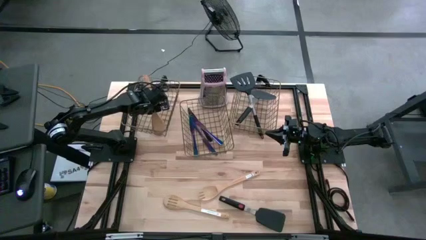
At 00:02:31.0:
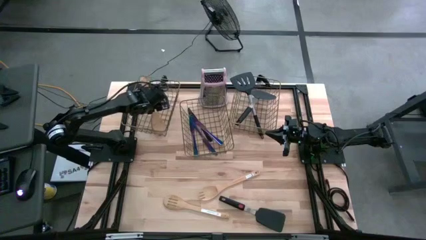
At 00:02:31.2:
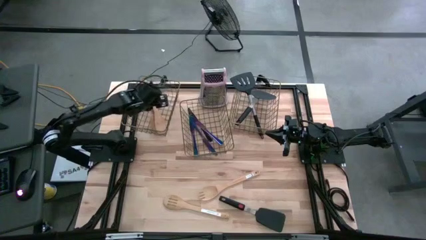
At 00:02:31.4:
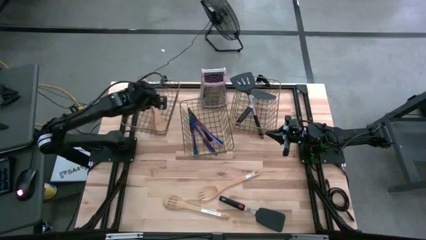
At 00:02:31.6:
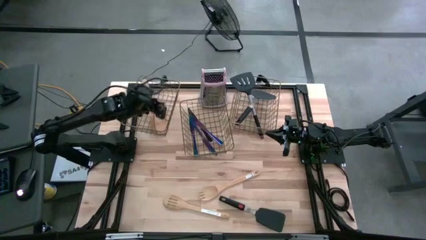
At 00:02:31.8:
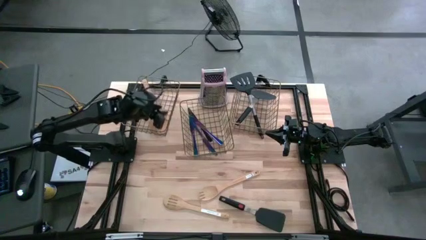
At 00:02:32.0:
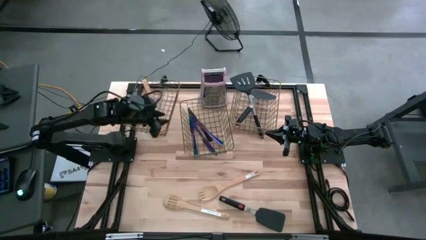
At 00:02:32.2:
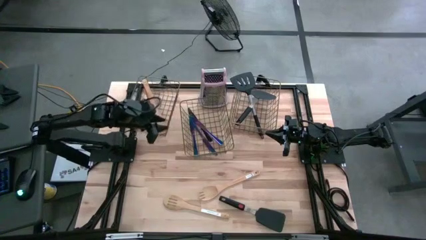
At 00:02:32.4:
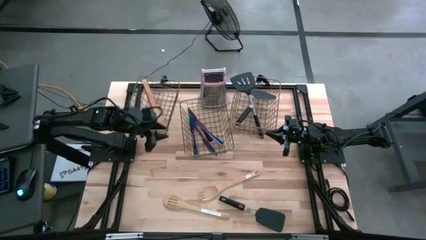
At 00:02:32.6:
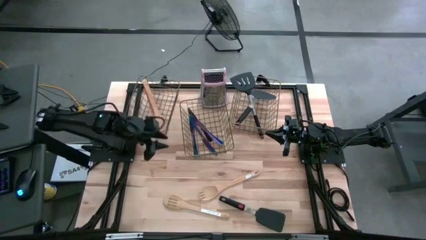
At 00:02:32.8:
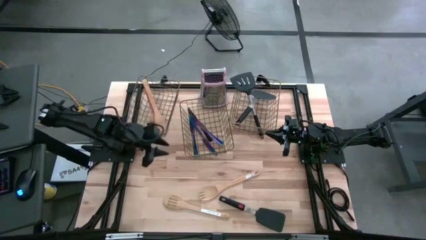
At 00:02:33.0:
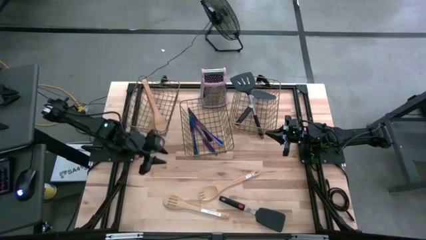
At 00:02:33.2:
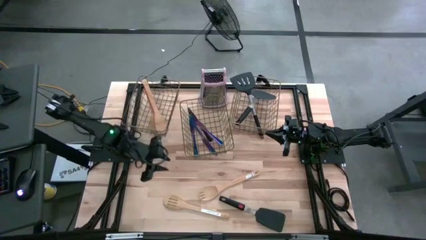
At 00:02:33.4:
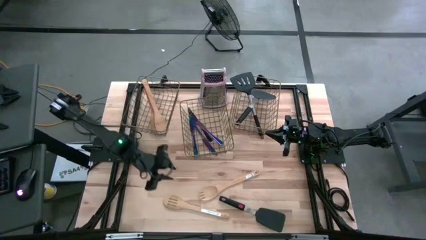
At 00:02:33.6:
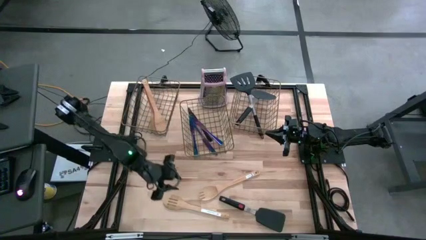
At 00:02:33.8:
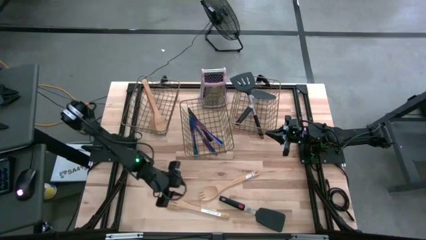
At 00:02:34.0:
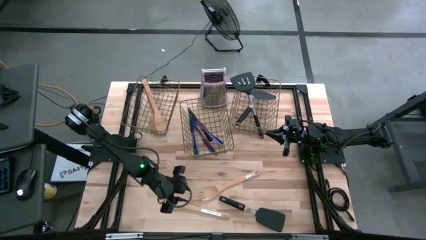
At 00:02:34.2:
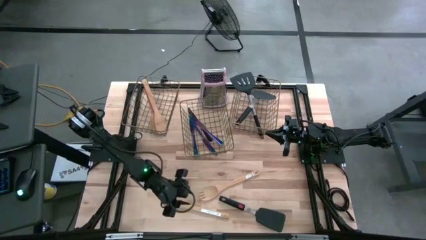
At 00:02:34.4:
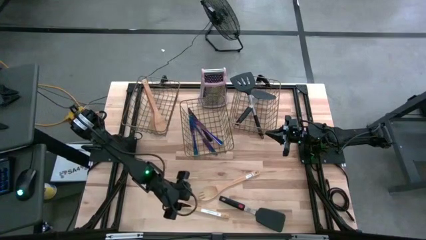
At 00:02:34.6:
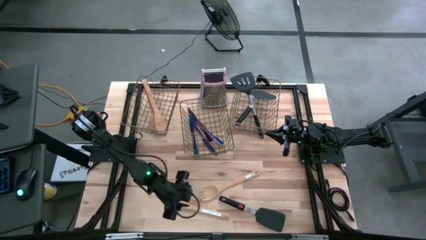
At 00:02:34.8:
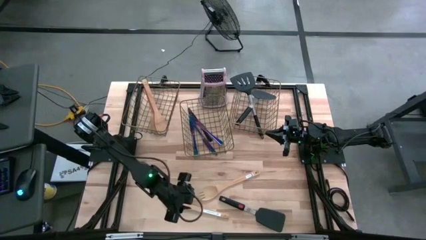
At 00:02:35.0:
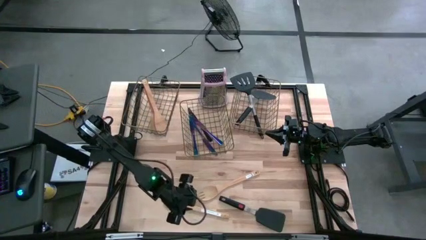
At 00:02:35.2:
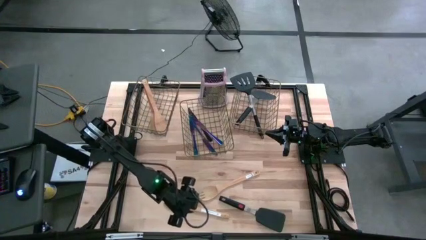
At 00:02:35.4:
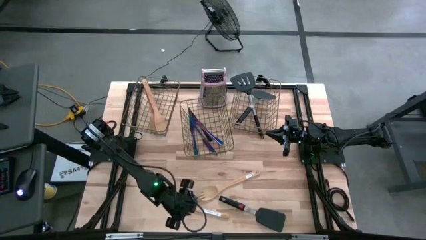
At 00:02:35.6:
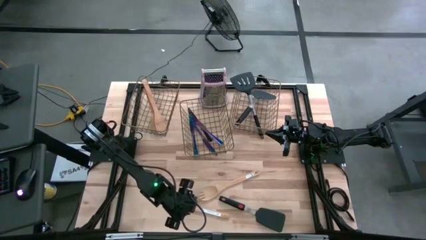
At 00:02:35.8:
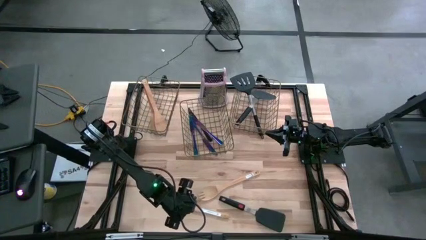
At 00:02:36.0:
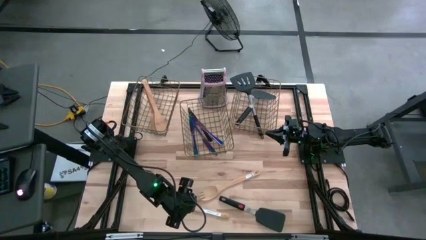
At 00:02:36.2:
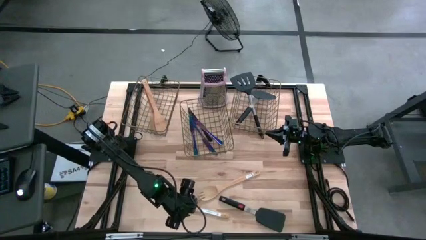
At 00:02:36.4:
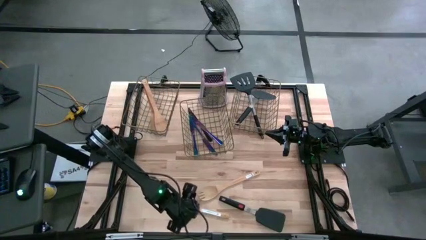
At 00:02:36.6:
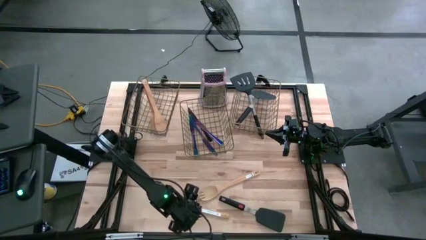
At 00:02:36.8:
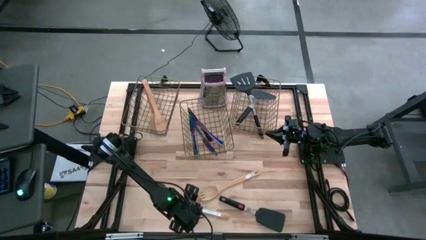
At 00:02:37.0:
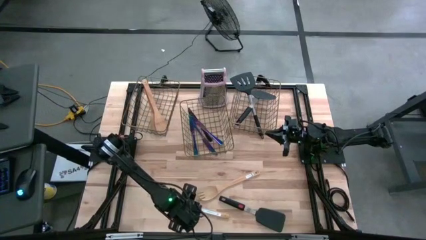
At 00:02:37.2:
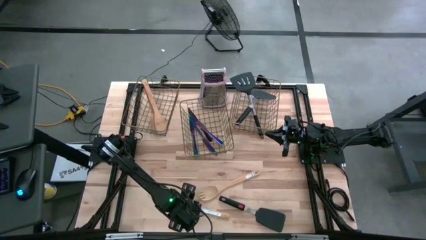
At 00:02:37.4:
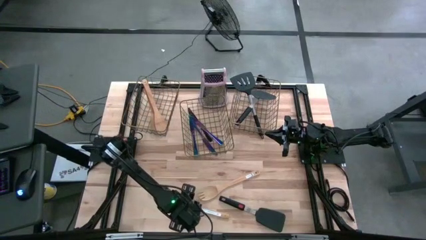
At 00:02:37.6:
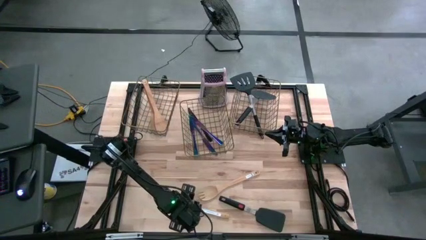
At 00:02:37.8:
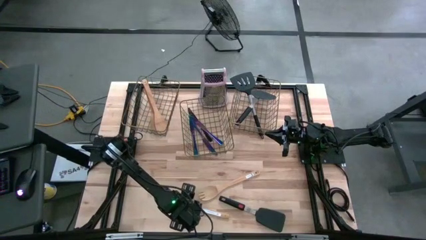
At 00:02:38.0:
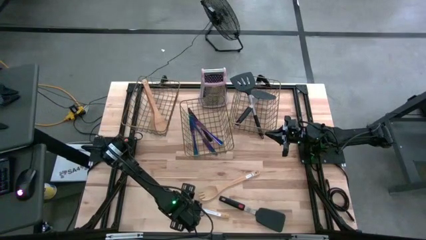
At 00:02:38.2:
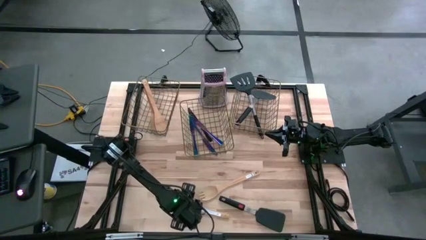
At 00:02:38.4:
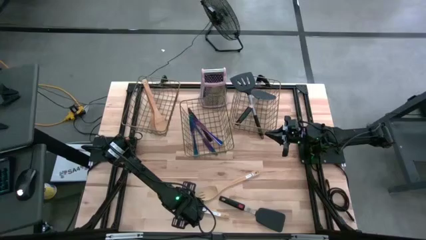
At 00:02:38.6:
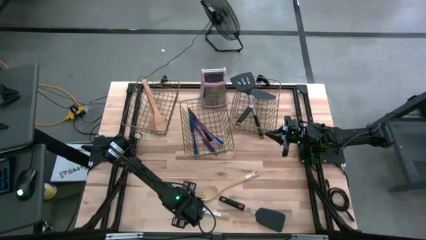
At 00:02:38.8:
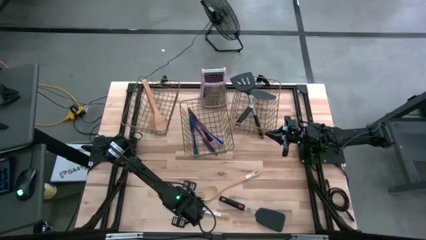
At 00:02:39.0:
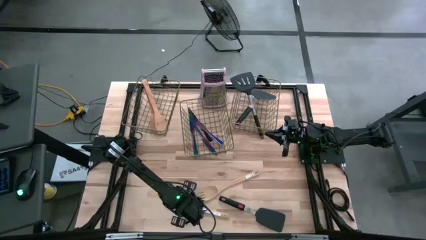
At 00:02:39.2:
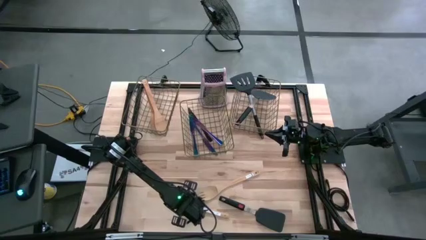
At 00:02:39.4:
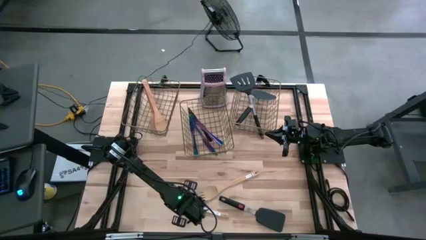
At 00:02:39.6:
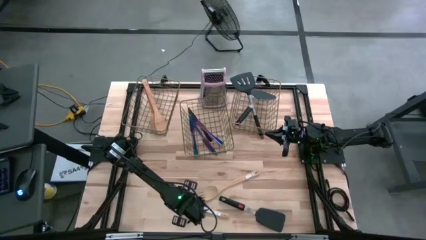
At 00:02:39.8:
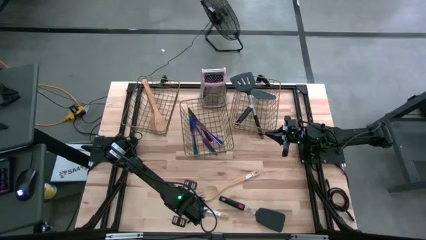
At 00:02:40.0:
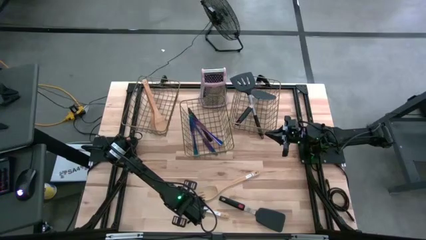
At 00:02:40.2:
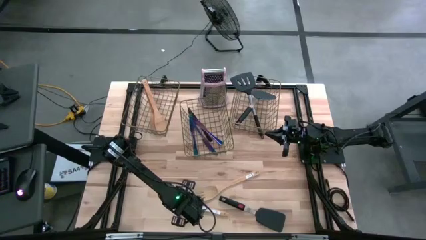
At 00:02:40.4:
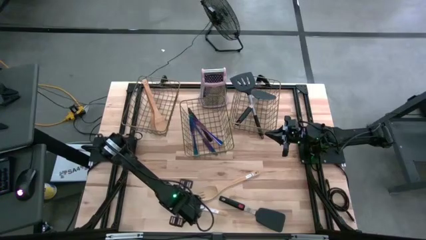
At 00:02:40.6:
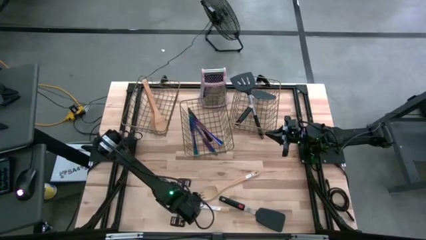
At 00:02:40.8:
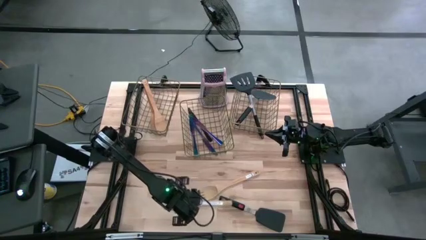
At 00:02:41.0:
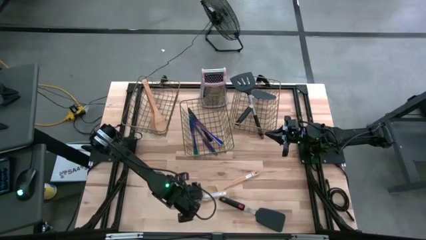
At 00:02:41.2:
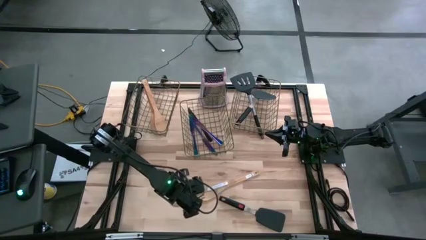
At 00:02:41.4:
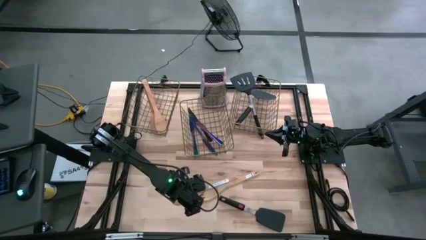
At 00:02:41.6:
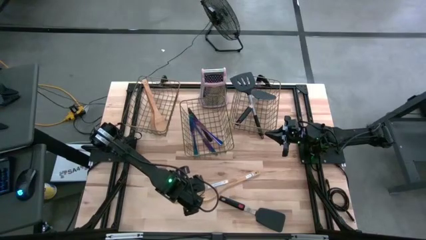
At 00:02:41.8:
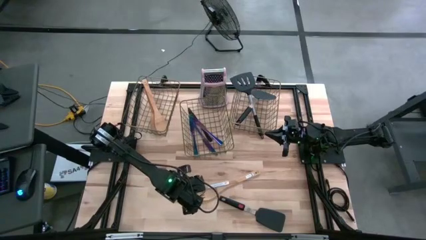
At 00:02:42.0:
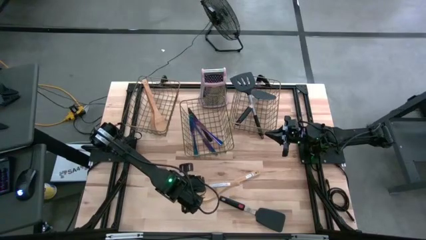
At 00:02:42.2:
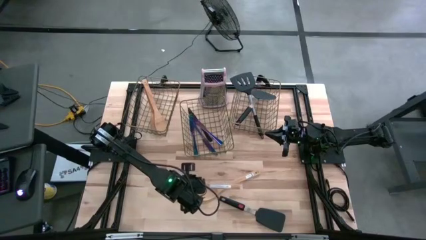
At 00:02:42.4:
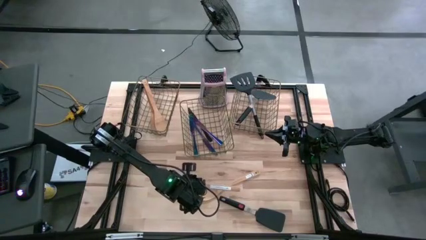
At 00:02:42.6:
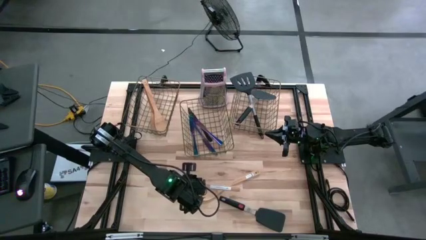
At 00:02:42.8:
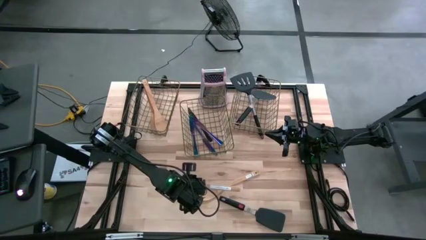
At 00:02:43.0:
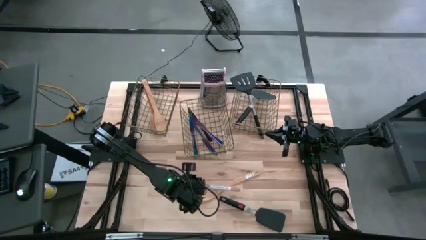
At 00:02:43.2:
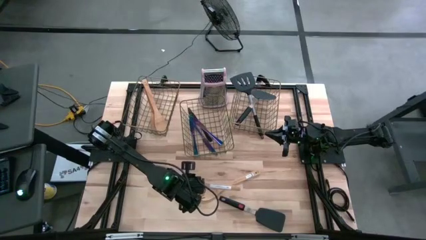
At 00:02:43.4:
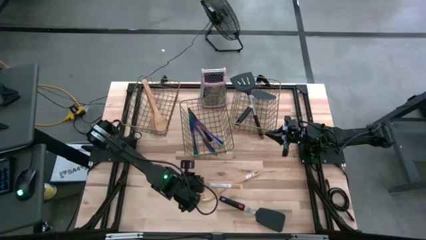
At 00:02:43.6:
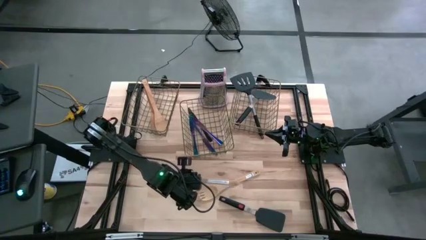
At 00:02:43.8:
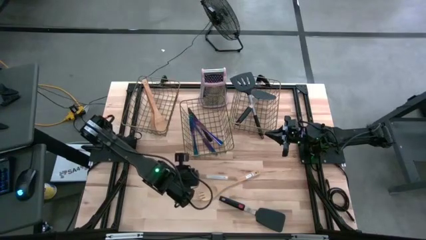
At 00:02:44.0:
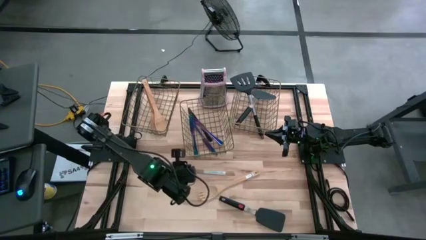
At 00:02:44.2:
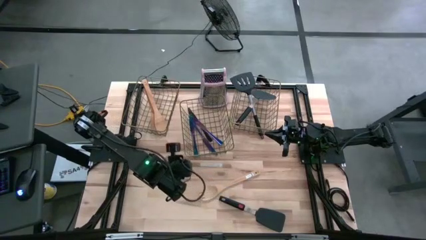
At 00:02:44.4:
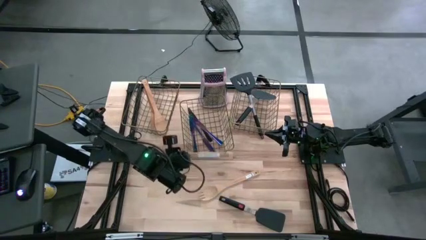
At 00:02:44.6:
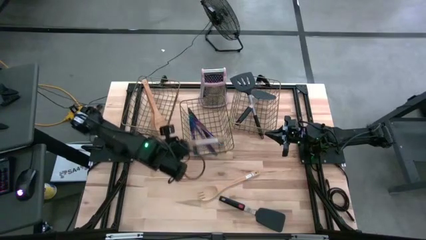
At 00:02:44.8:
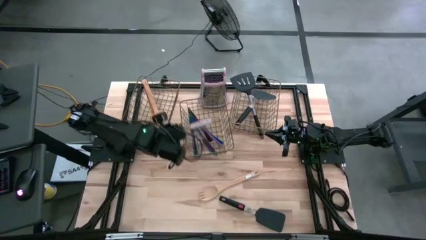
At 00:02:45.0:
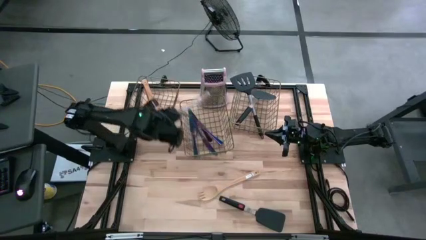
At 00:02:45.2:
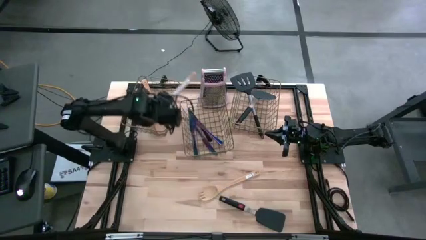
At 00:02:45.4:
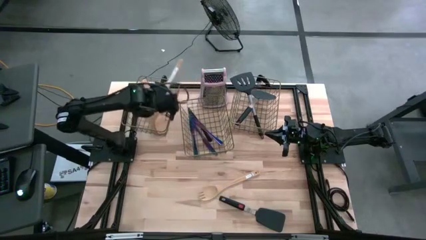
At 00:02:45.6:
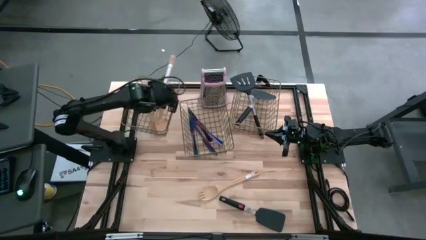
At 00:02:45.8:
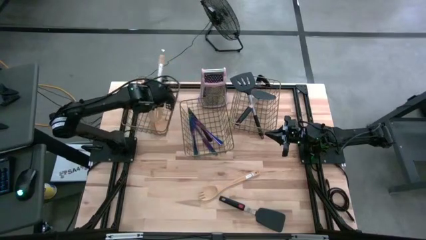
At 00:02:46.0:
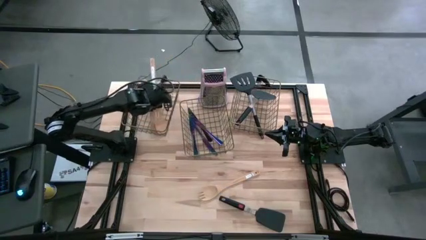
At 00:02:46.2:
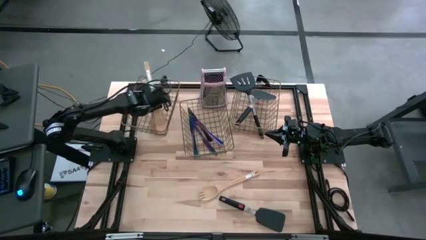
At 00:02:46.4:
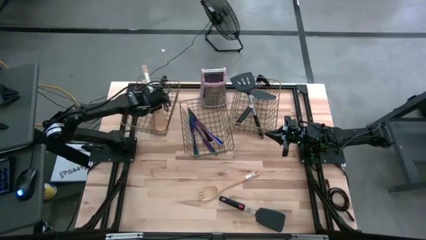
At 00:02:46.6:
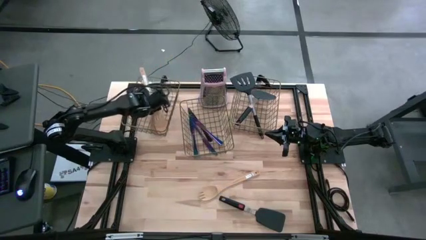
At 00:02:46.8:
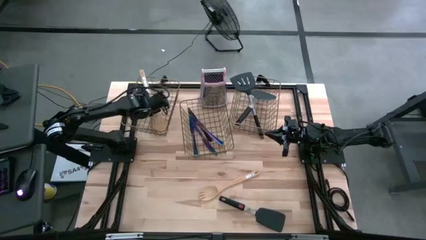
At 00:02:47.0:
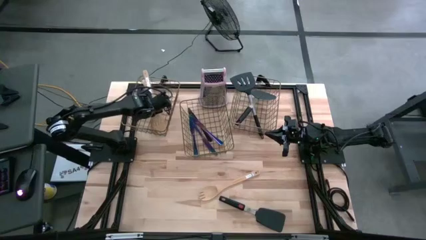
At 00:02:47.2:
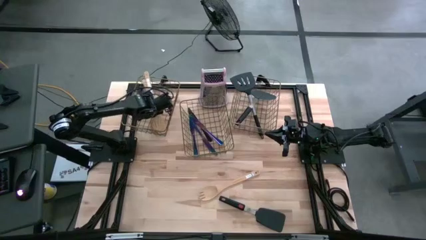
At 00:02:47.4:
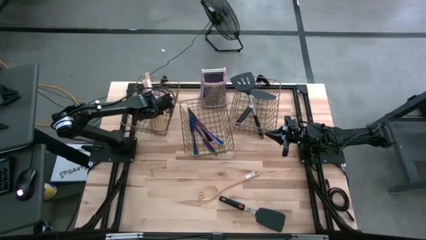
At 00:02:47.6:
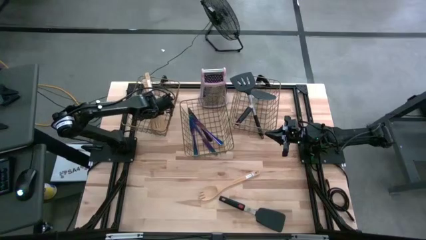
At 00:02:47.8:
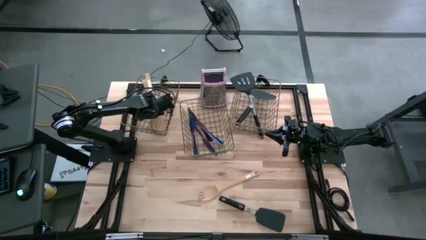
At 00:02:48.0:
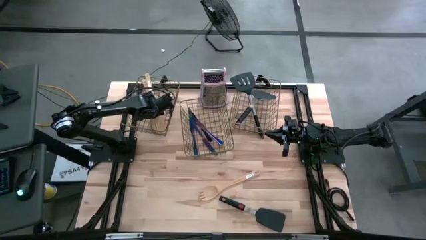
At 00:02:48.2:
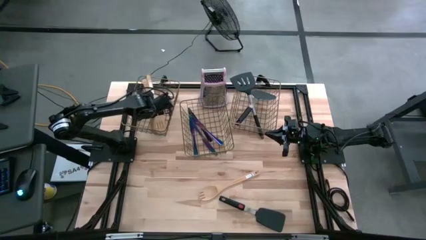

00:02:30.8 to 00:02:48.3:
Task: Pick & Place Kitchen Items
Put the bottom brown serving spoon into the left wire basket
